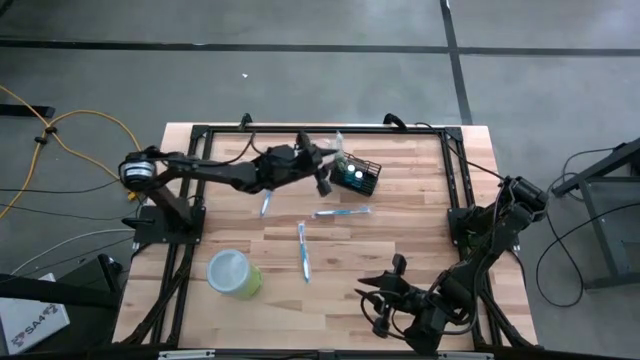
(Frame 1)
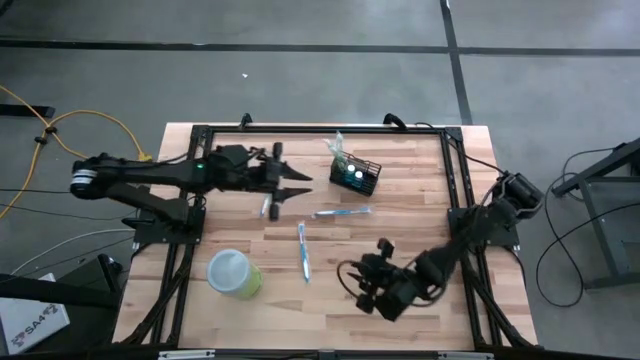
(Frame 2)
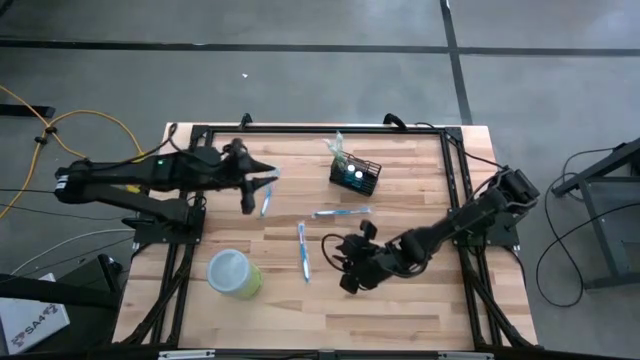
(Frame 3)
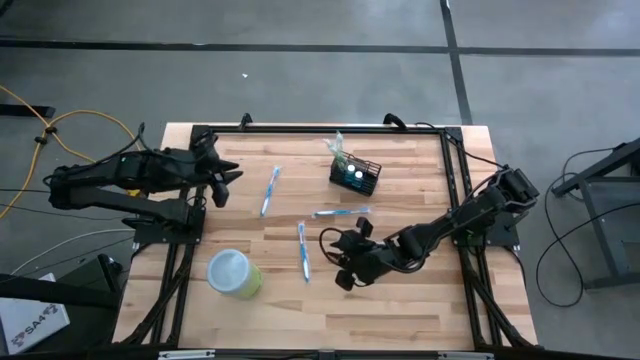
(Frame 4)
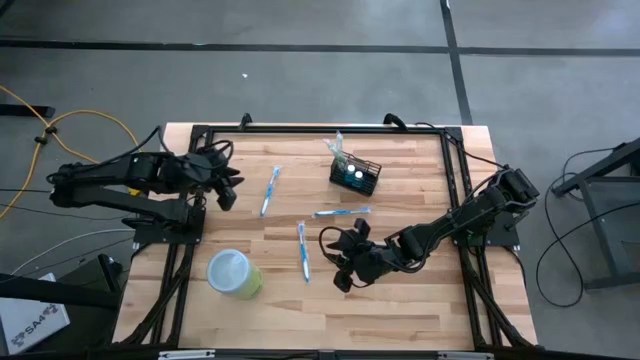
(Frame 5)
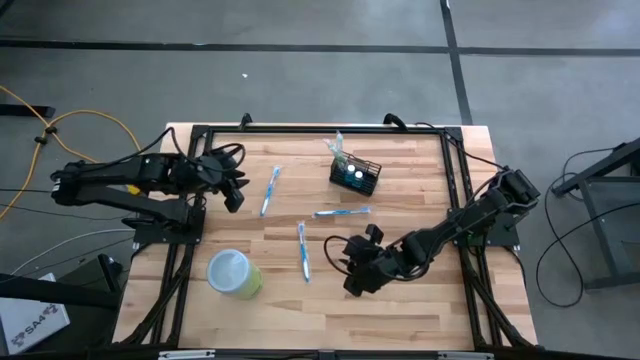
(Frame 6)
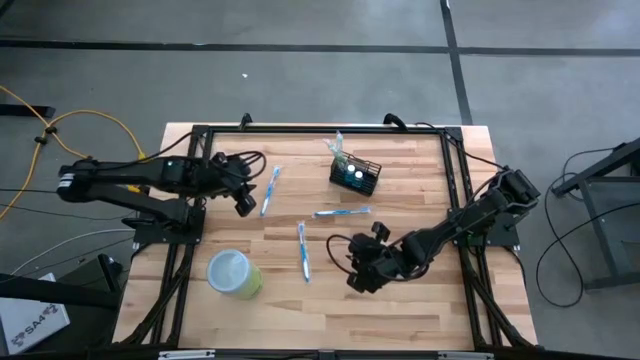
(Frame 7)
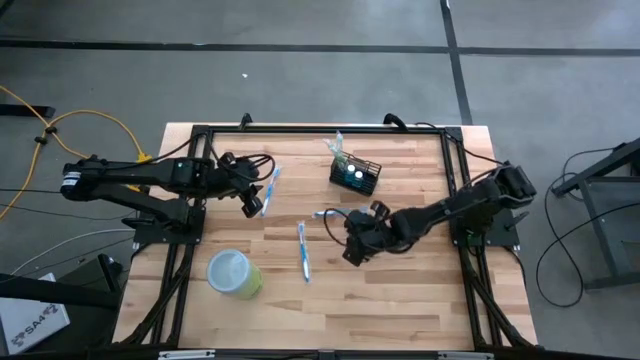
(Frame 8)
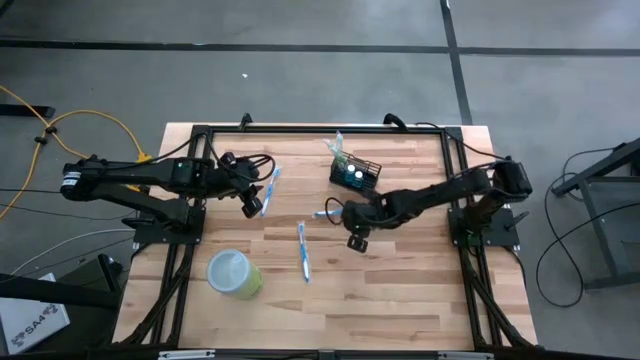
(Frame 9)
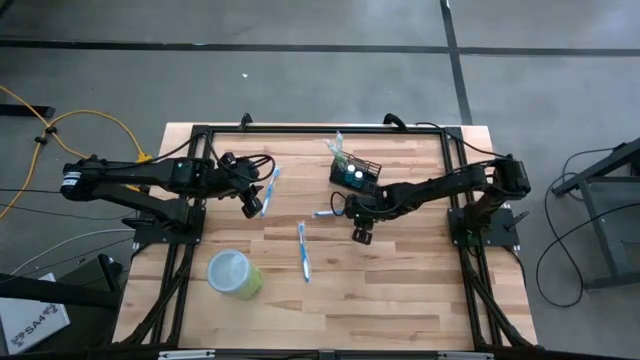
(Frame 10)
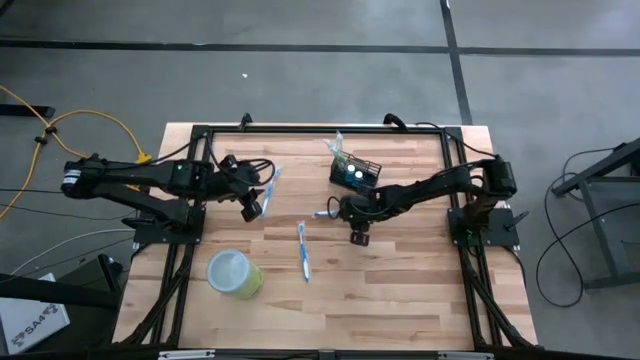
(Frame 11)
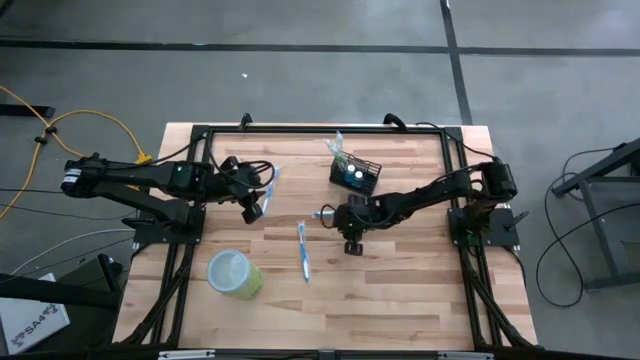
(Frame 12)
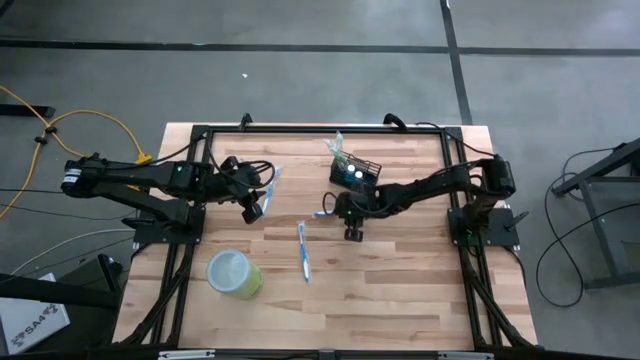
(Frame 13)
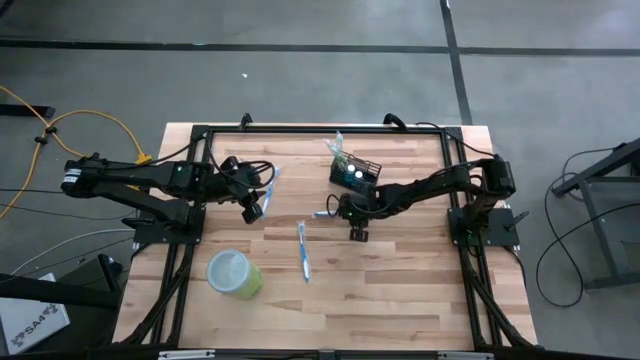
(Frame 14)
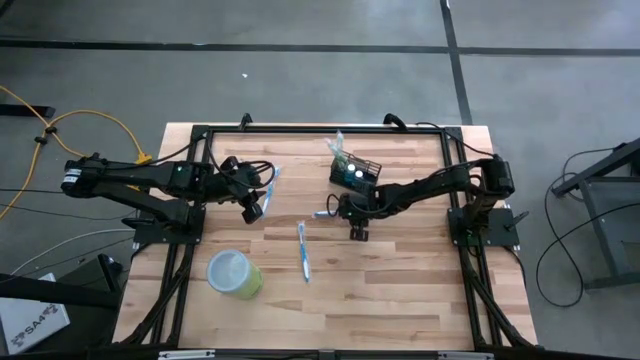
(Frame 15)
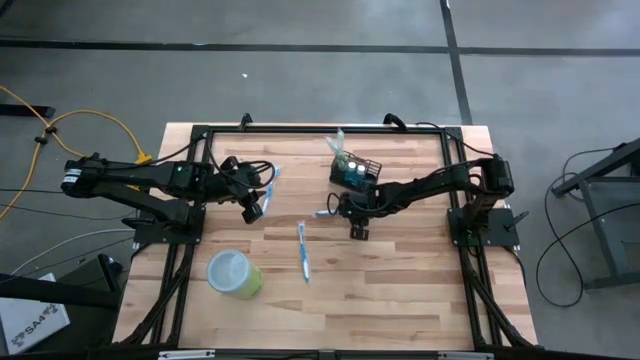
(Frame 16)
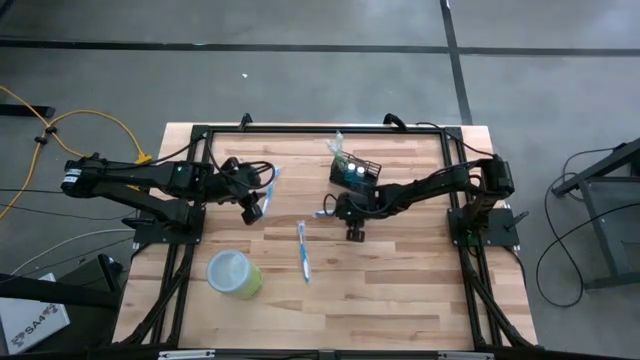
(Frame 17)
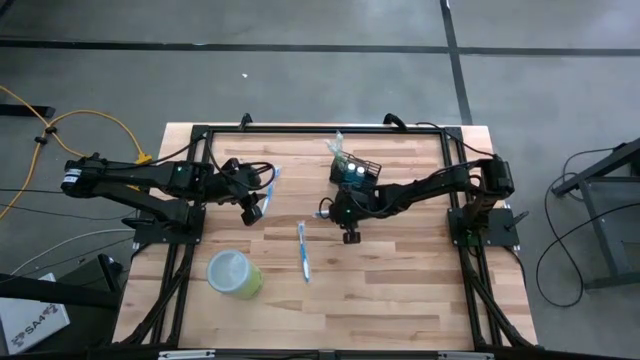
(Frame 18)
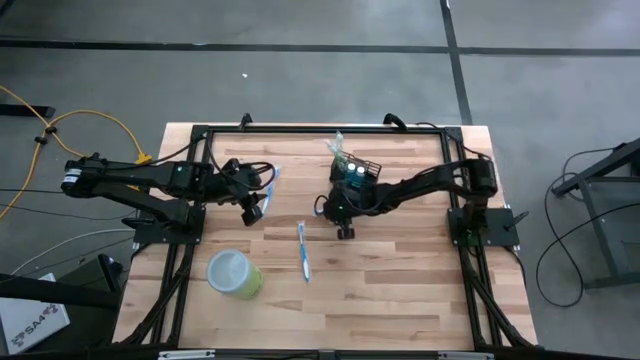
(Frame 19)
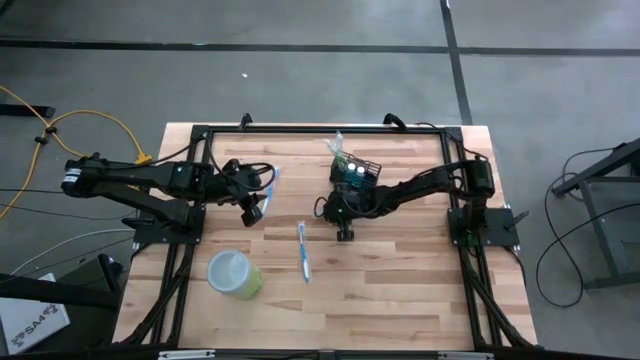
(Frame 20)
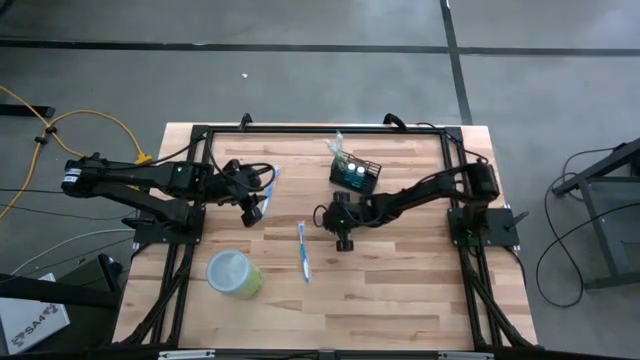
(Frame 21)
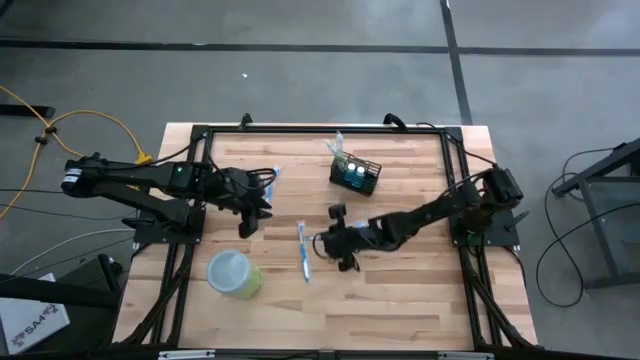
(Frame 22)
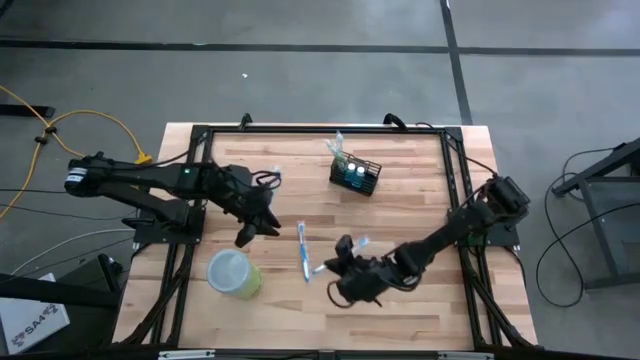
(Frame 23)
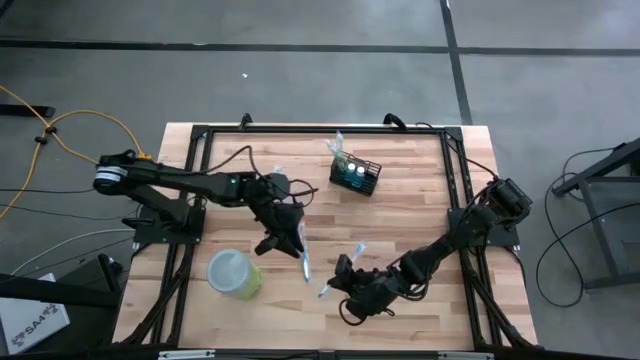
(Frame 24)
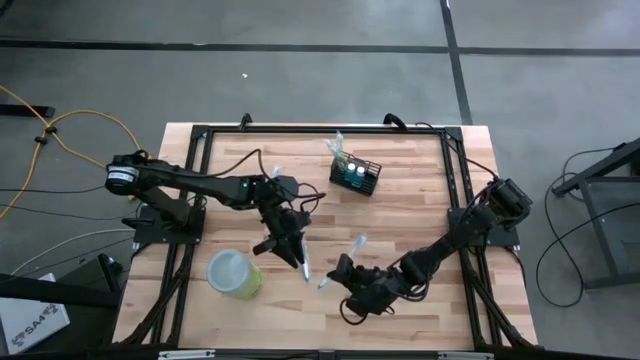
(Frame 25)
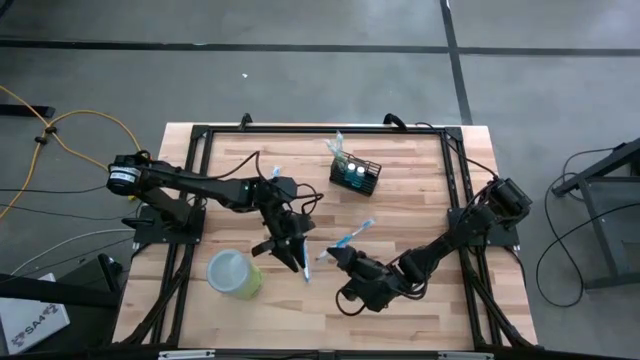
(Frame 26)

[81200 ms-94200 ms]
Task: Pick & Place toothbrushing station
Put the top right blue toothbrush into the right section of the black mesh organizer

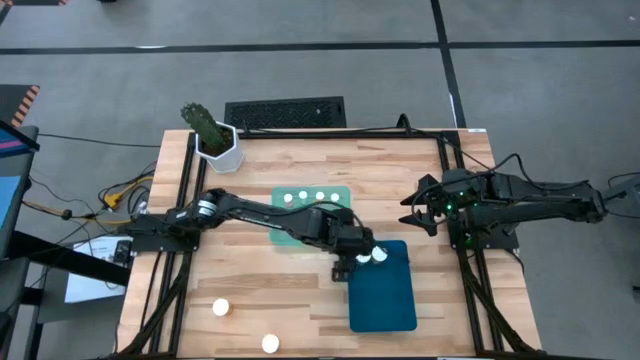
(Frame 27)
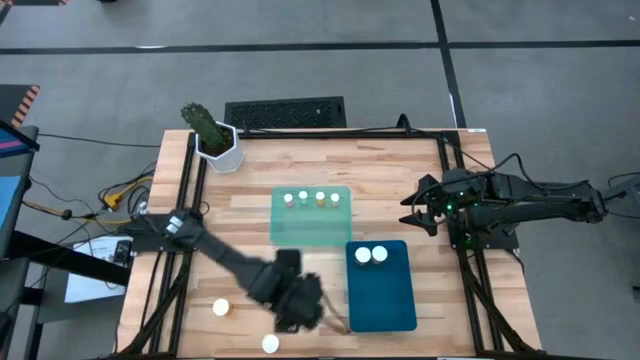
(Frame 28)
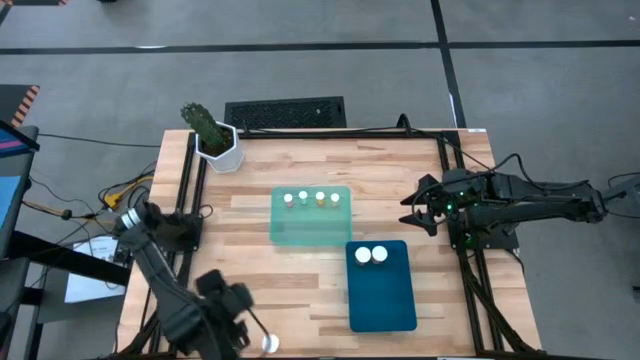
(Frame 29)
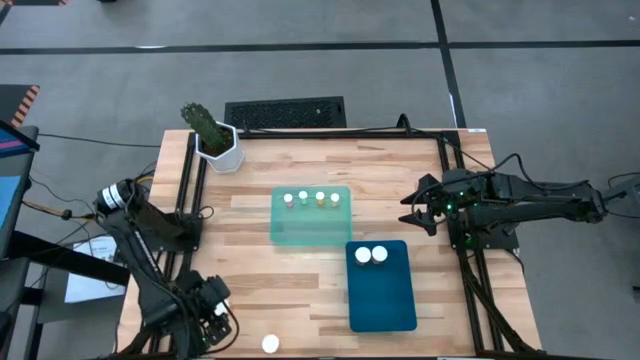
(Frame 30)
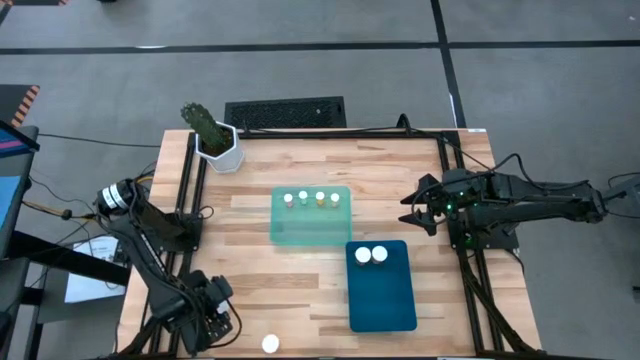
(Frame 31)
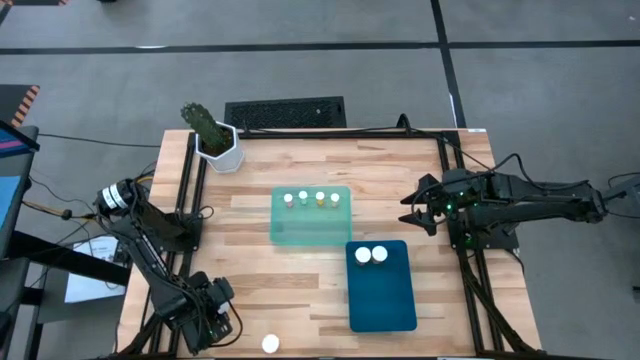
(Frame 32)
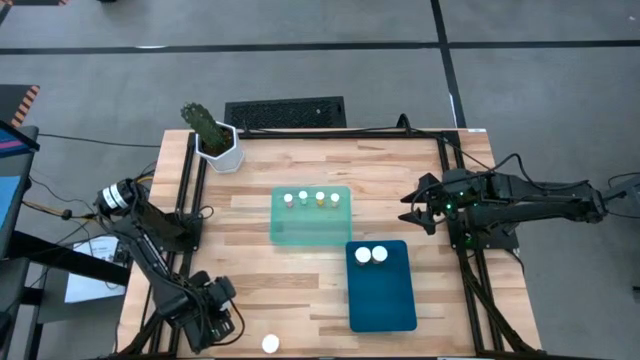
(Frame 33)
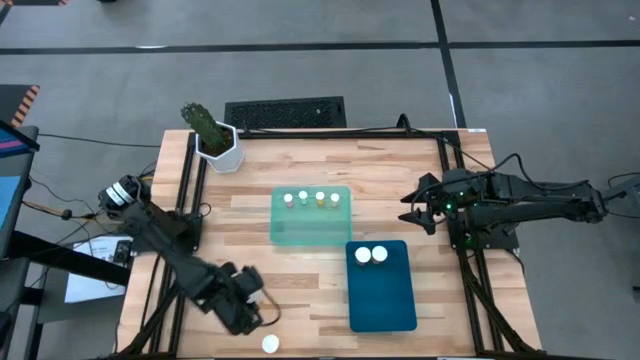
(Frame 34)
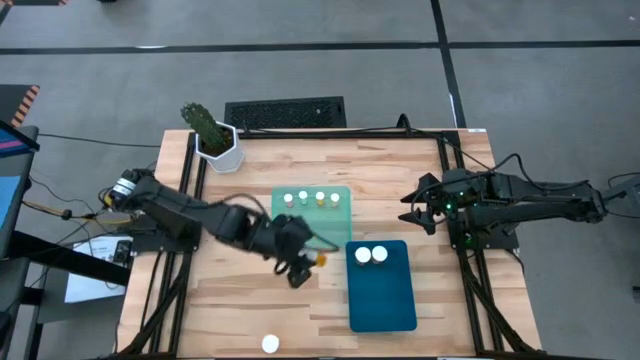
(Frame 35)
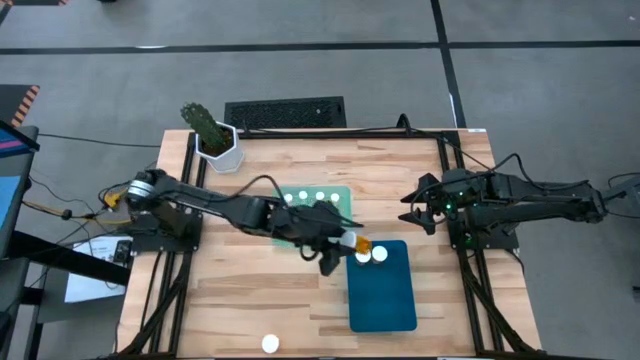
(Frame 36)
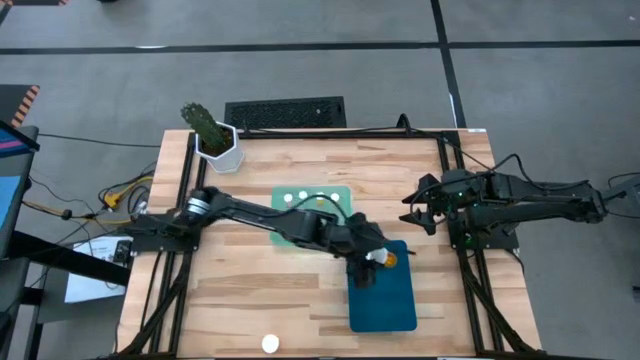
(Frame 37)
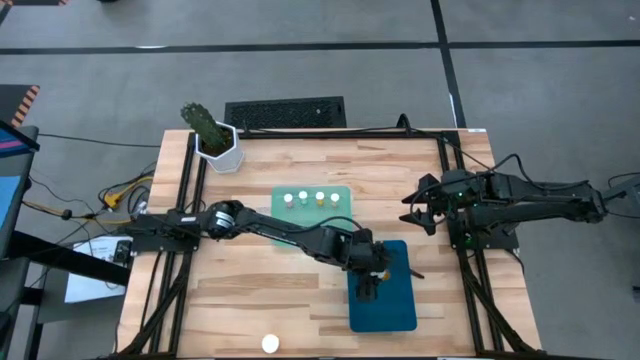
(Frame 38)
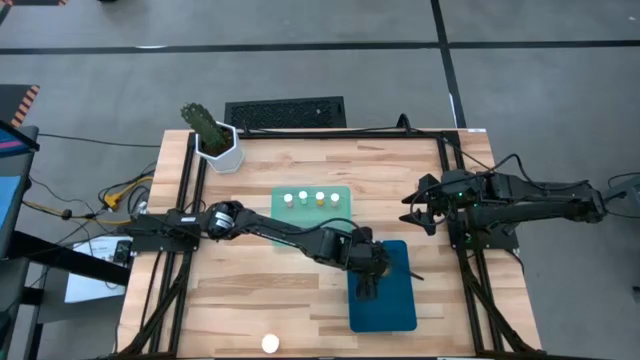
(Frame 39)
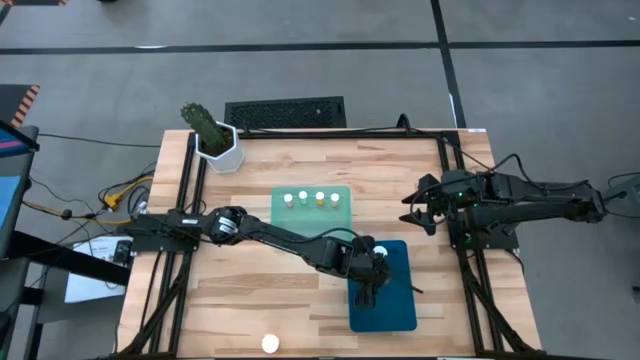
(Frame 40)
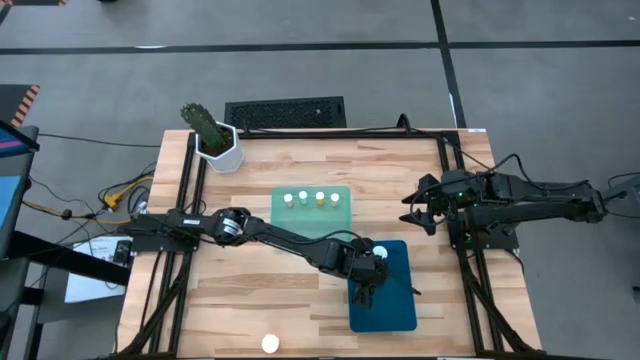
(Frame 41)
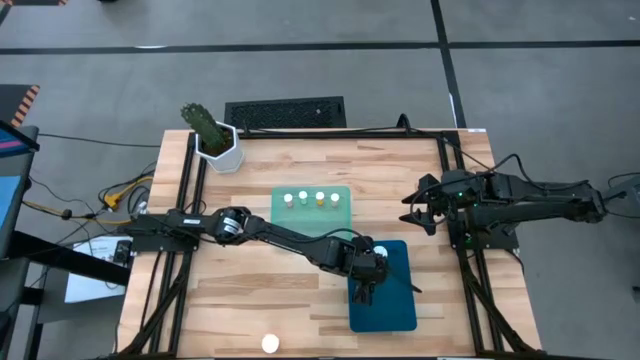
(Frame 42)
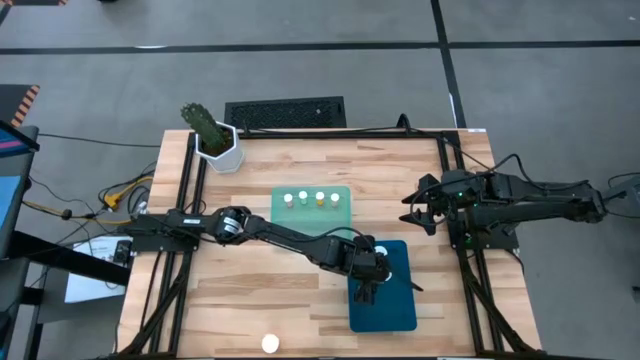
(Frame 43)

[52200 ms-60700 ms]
Task: Pick and place medicine bottles into bin by pill shape (circle, oval)
Put the large orange pill bottle into the blue bin

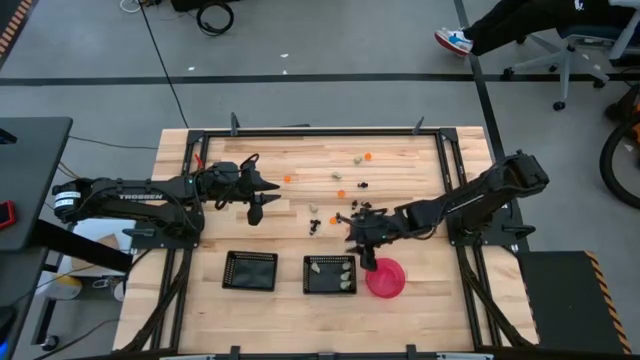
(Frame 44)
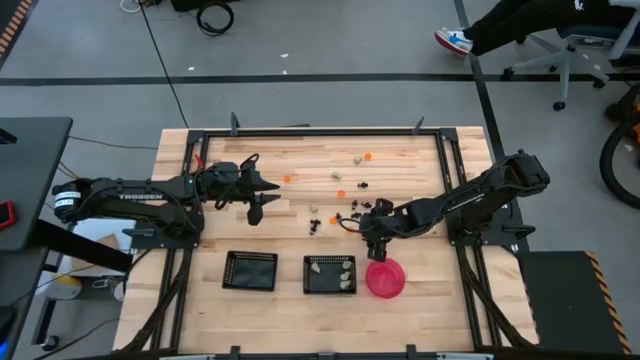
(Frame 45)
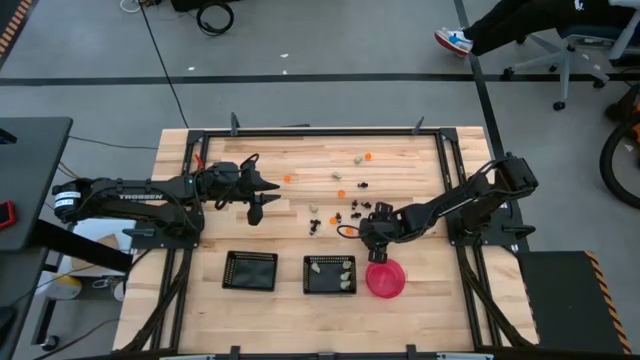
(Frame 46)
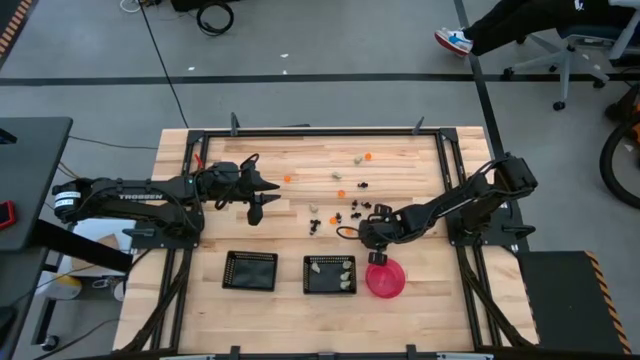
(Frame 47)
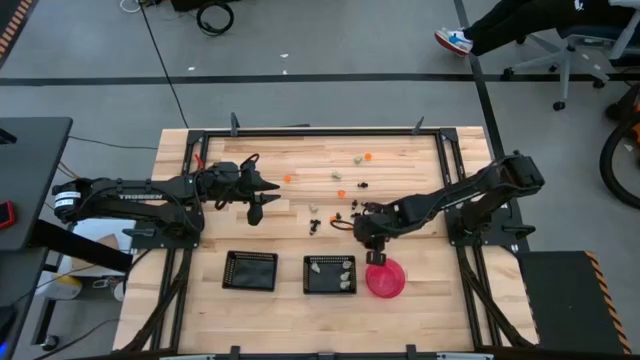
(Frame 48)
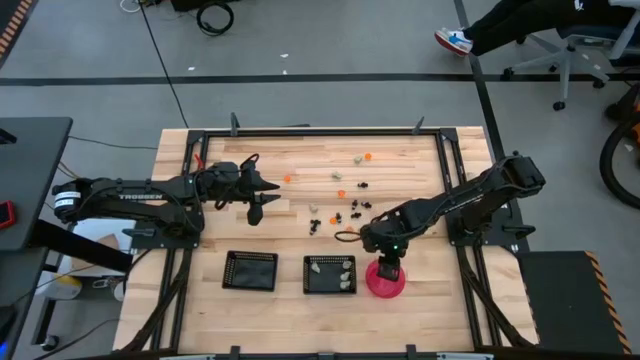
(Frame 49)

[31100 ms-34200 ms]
Task: Sort Halloween decoration
Put the orange pumpkin toy into the pink bowl
